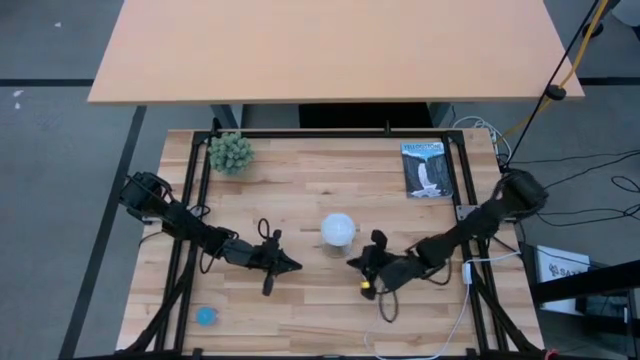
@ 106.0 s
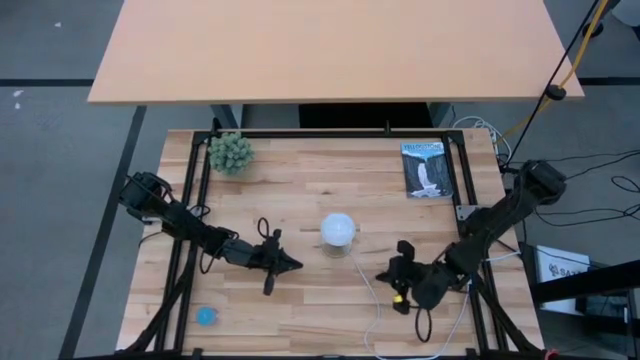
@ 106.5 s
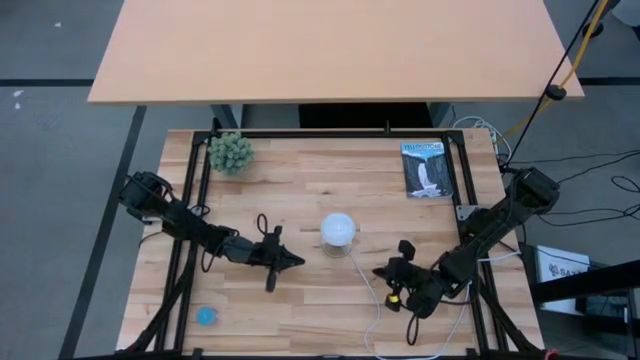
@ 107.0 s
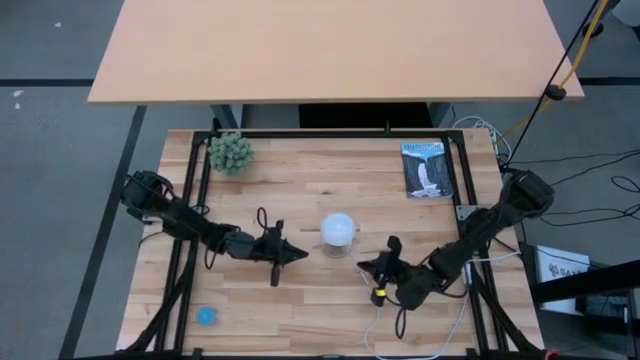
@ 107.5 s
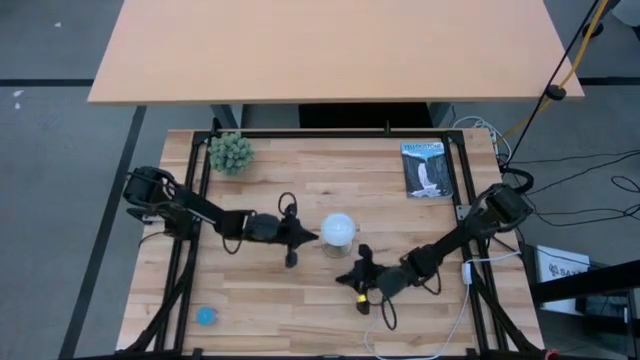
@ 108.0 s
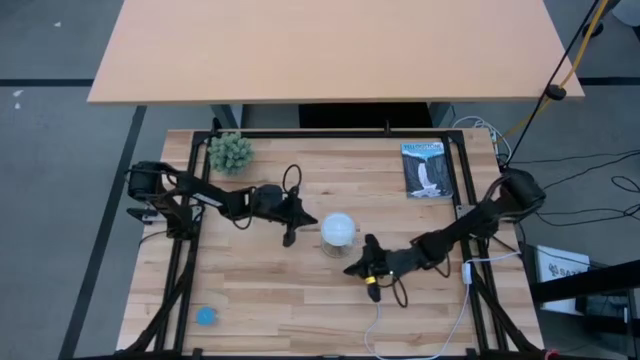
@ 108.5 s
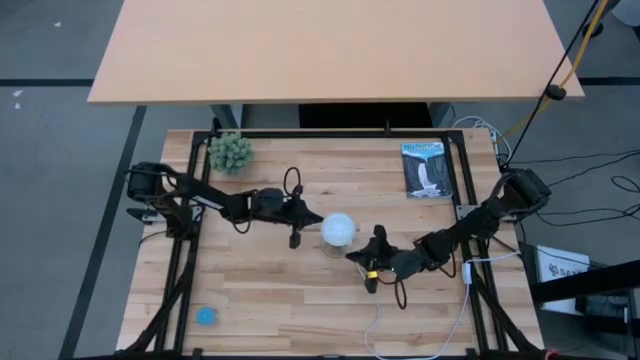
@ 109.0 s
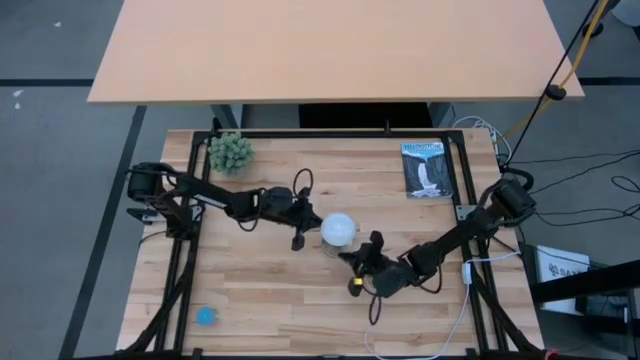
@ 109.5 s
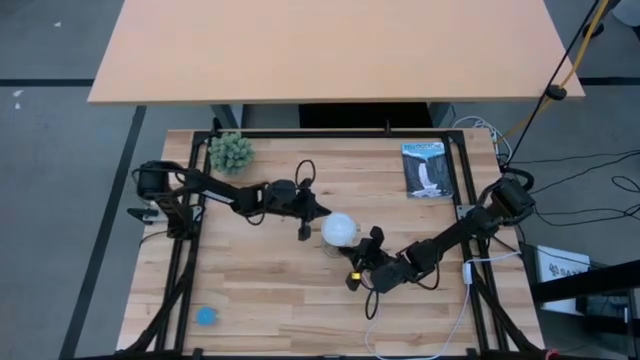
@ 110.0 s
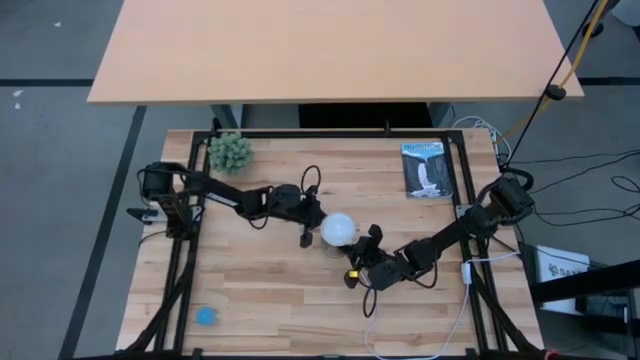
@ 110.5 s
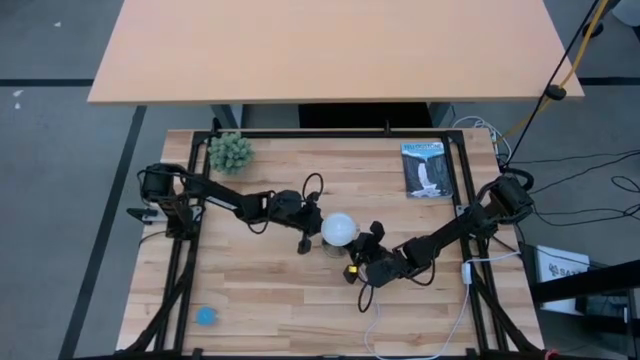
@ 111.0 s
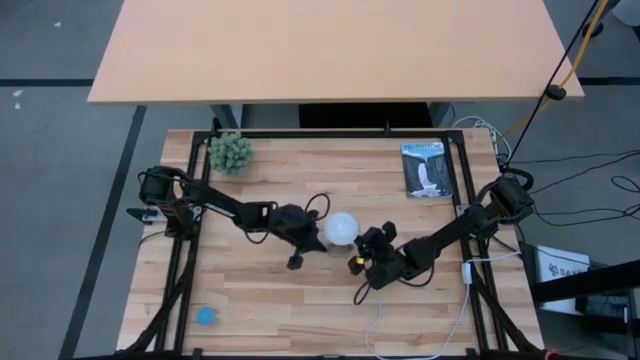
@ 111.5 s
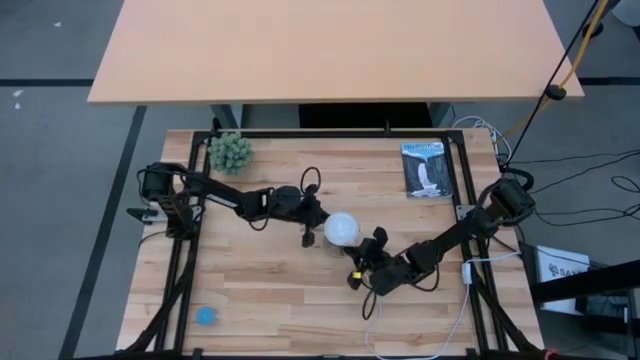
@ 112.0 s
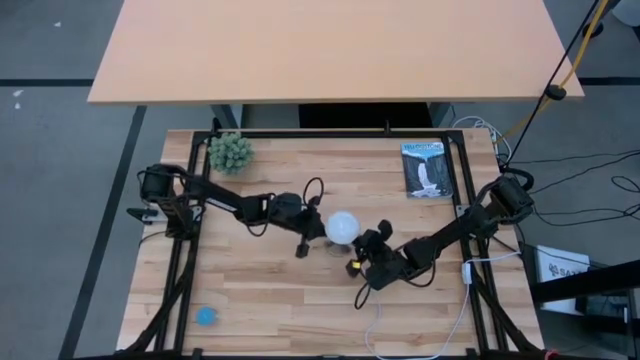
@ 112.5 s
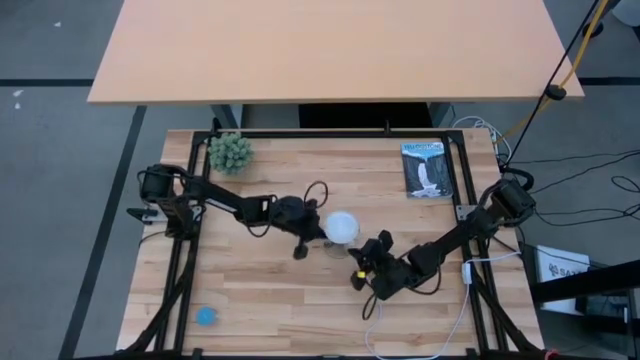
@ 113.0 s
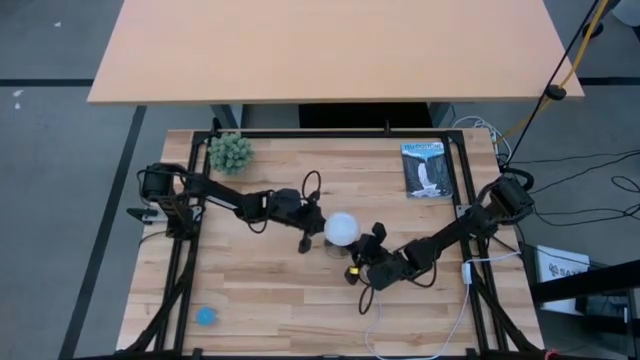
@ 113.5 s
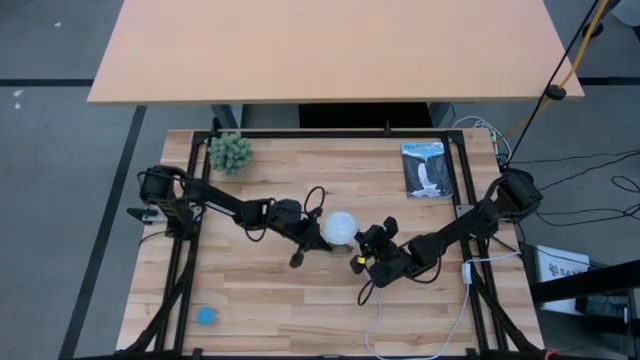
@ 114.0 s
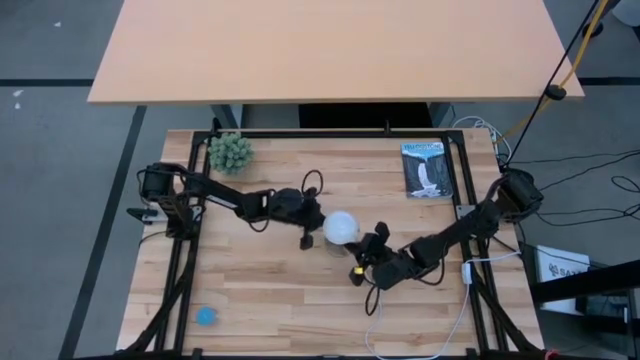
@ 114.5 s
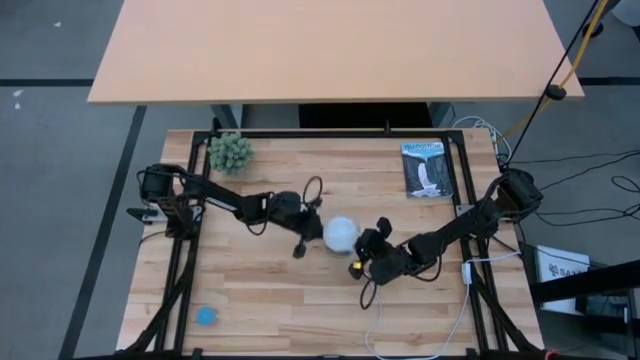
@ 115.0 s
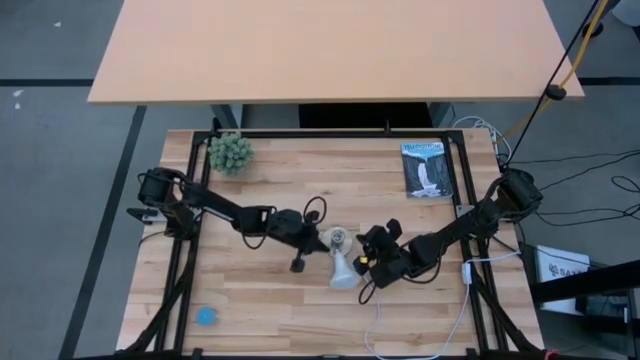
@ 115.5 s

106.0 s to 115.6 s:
Task: Screw lightbulb
Remove the white lightbulb from the desk lamp

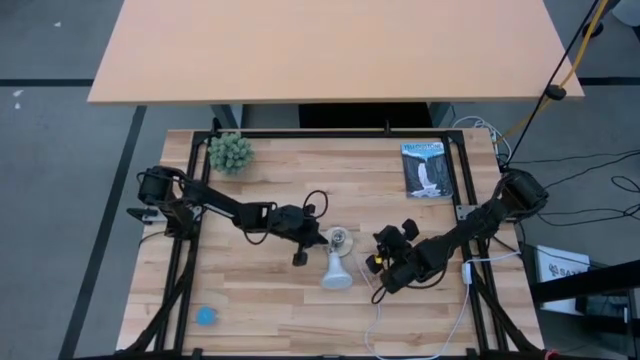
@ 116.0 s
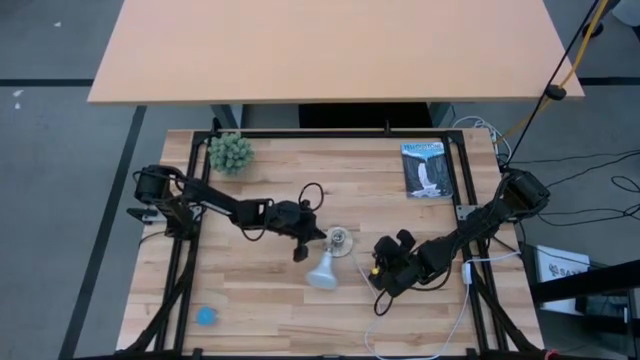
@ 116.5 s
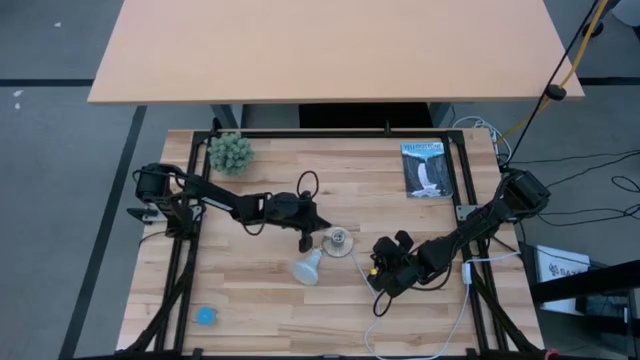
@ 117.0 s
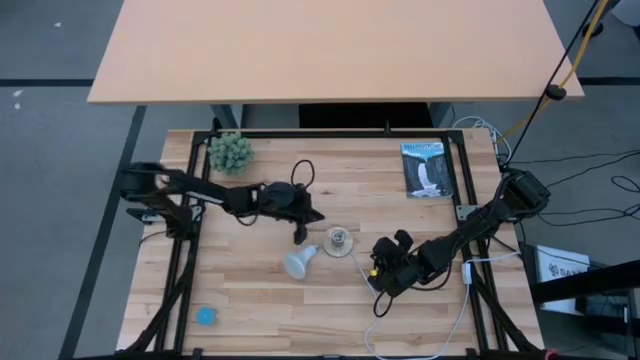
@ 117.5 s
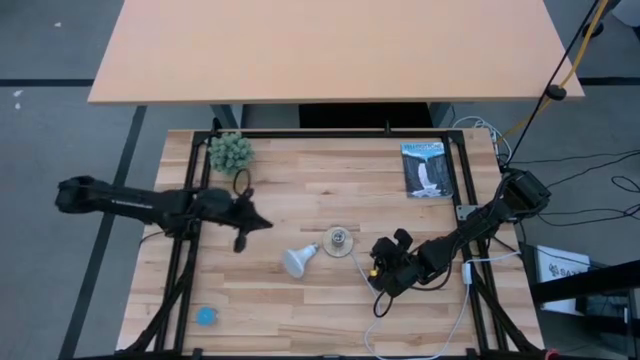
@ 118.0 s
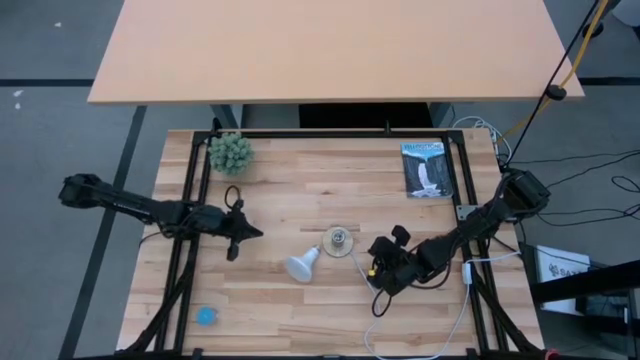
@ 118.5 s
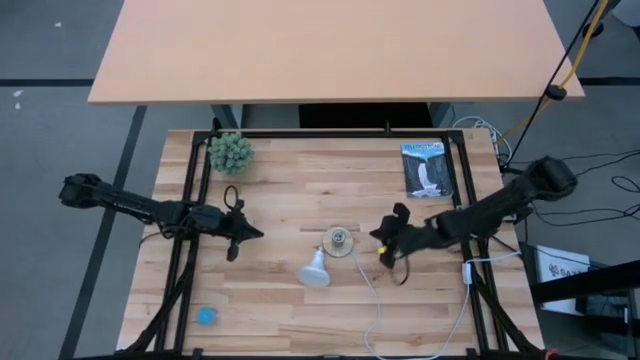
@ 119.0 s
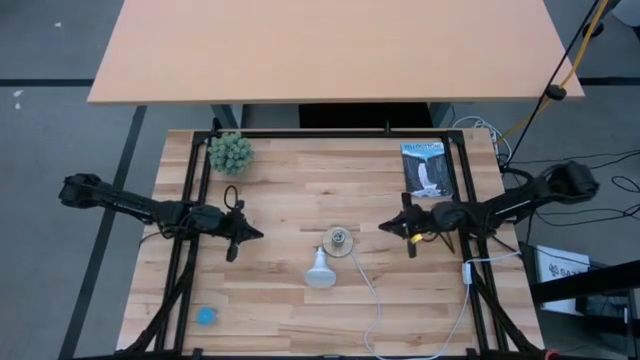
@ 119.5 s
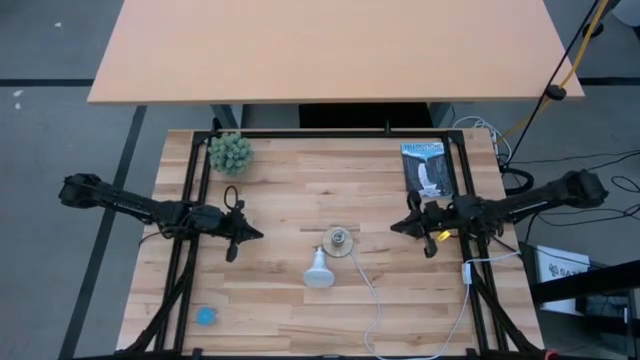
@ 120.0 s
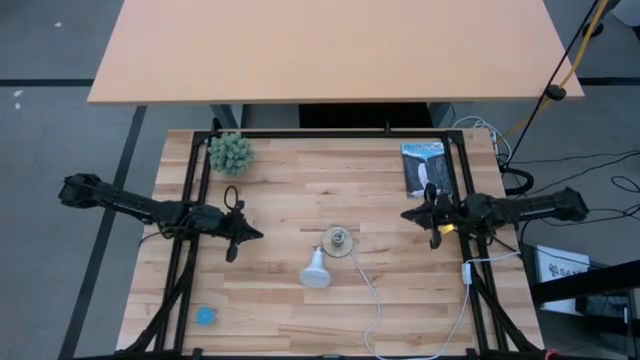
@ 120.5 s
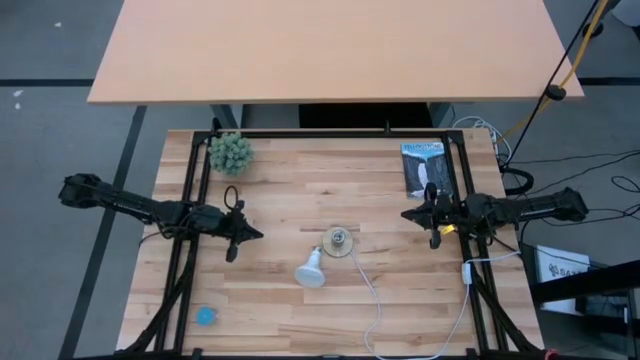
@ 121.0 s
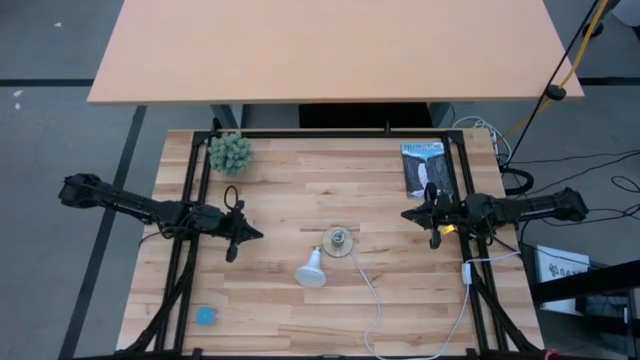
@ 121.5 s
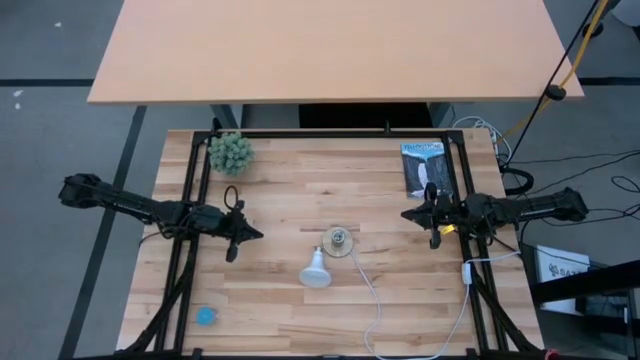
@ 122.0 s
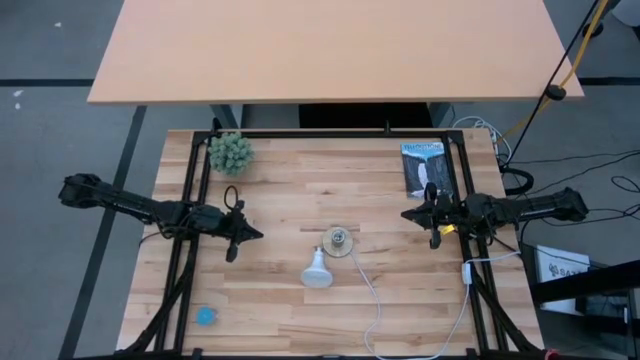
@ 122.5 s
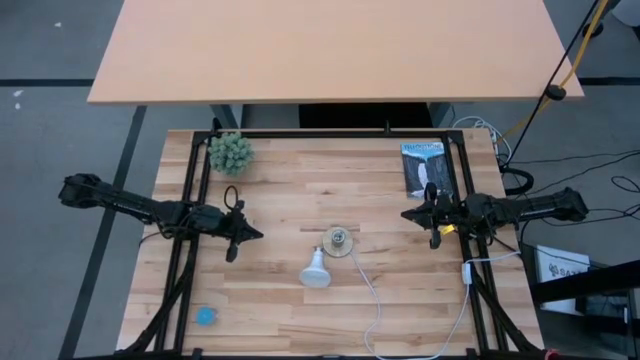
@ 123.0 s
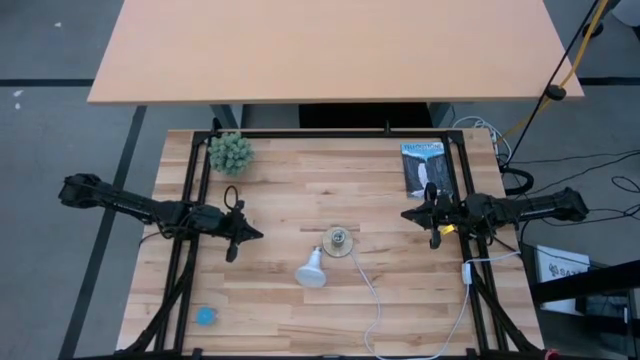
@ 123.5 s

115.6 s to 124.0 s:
Return to Home Position

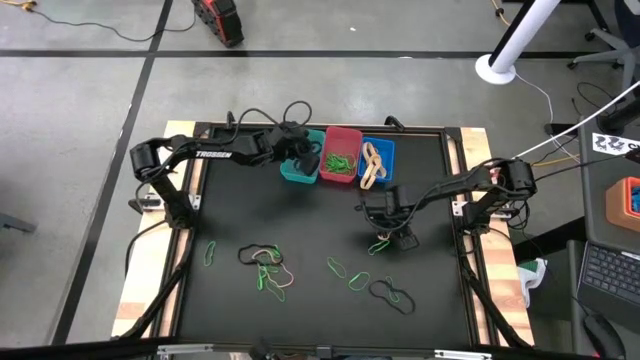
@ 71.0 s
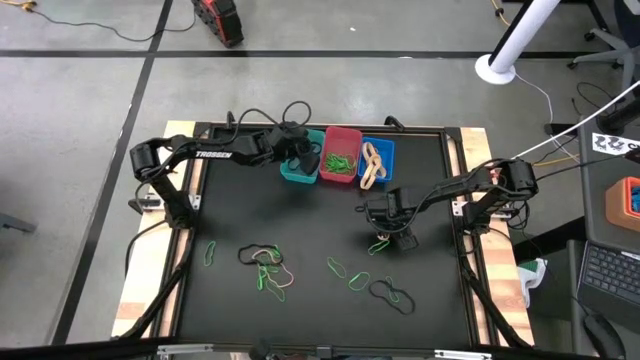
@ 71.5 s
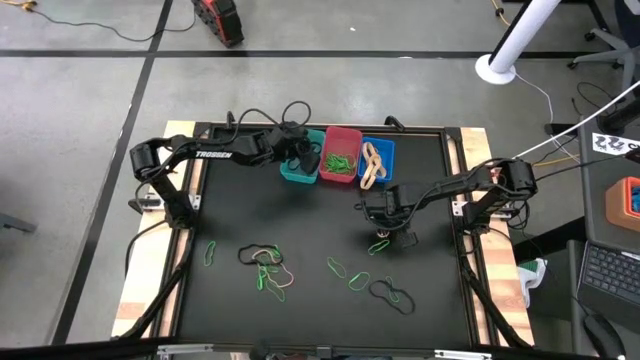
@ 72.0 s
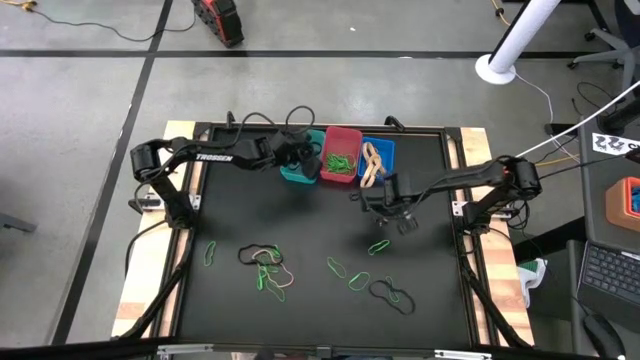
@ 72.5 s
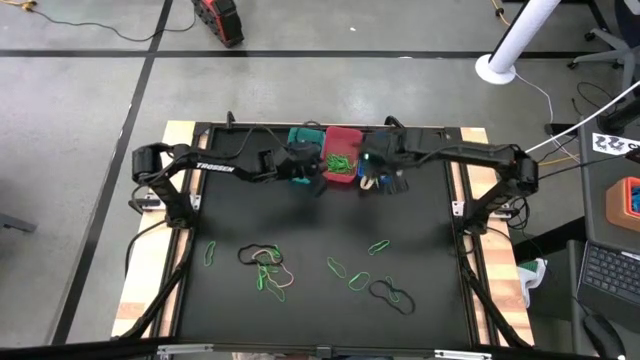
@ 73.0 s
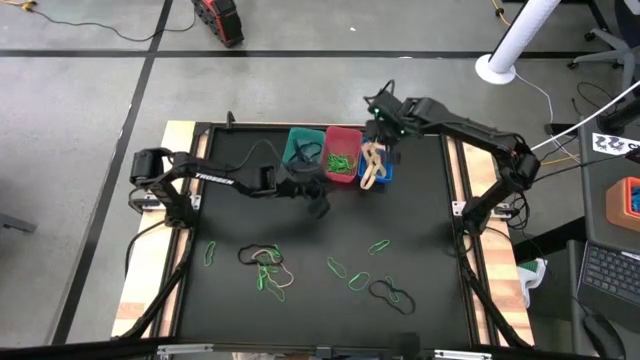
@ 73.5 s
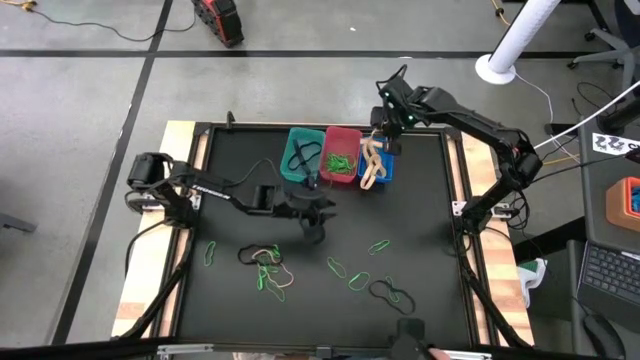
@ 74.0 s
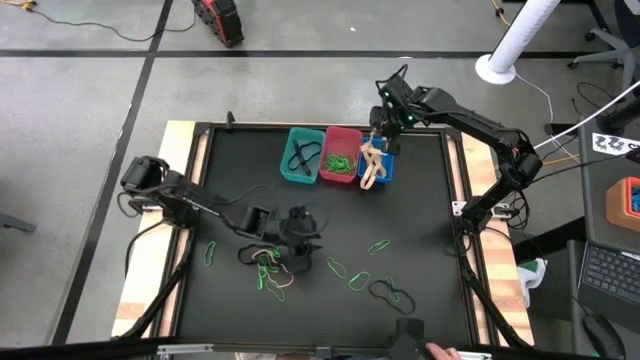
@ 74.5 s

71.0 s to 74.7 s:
Task: Sort rubber bands into baskets
Put the brown rubber band into the blue bin
